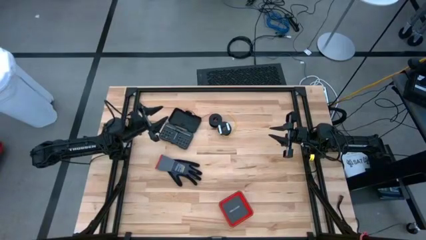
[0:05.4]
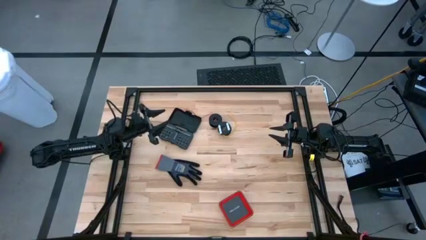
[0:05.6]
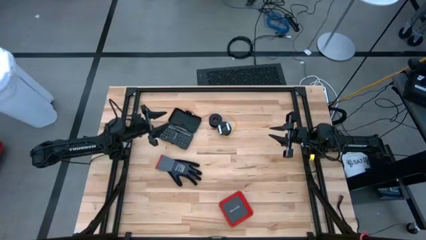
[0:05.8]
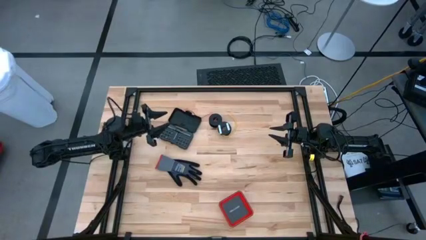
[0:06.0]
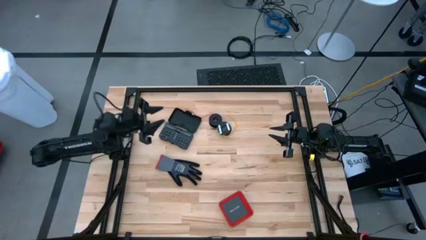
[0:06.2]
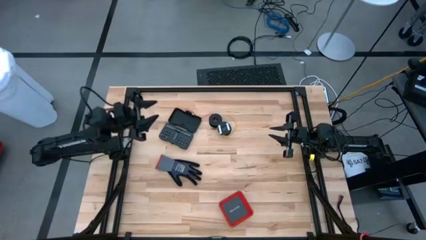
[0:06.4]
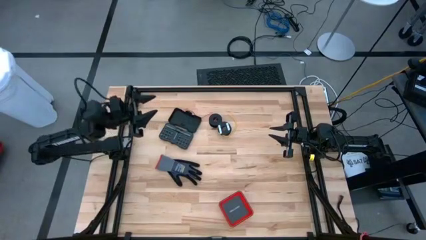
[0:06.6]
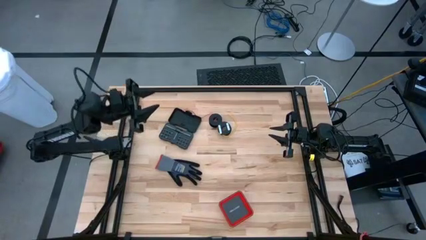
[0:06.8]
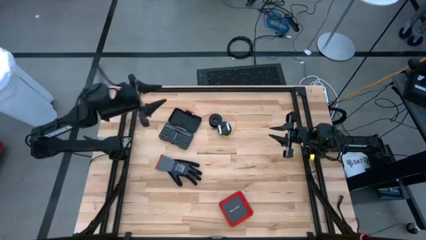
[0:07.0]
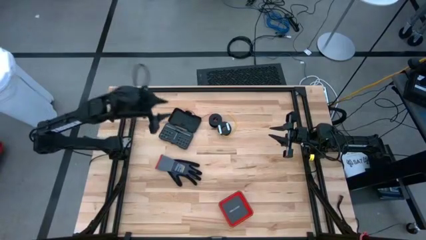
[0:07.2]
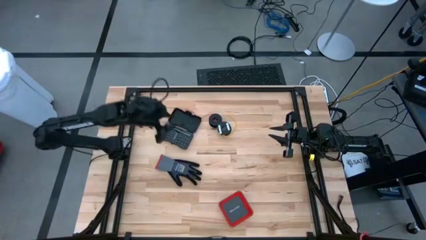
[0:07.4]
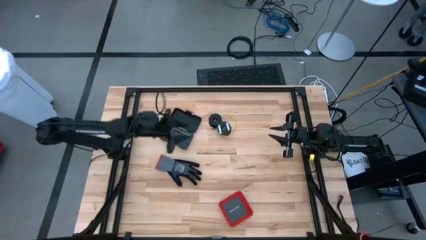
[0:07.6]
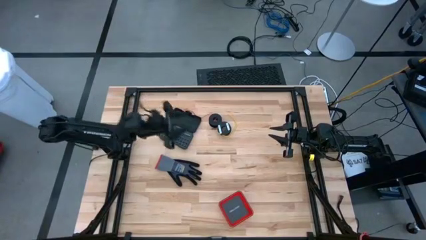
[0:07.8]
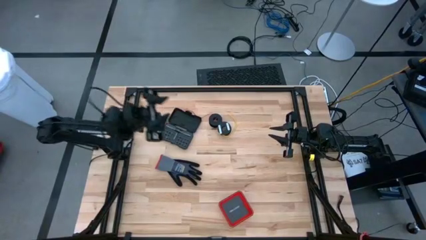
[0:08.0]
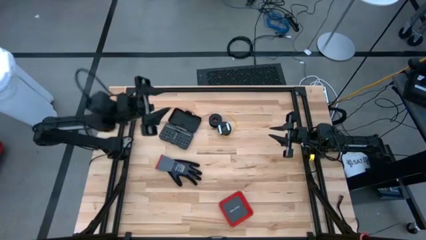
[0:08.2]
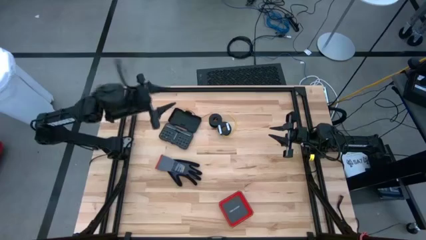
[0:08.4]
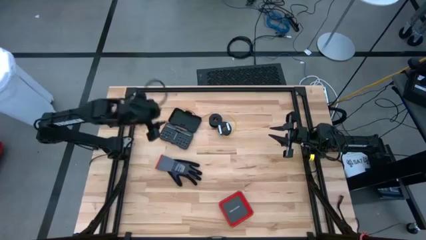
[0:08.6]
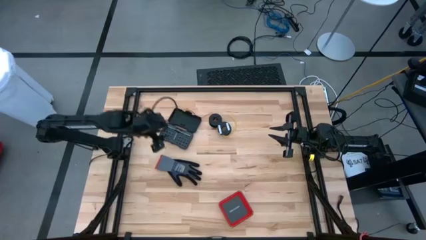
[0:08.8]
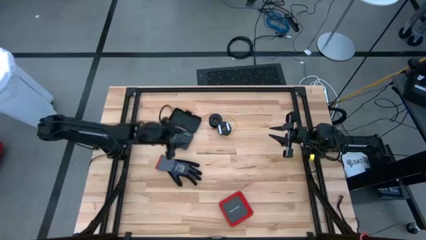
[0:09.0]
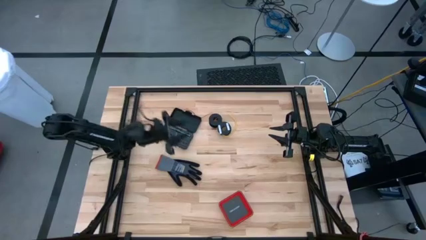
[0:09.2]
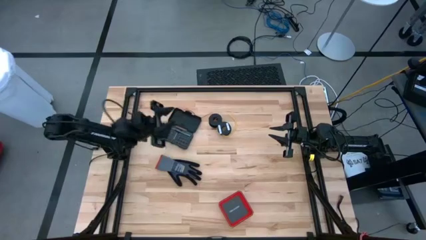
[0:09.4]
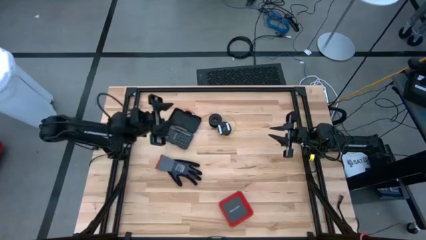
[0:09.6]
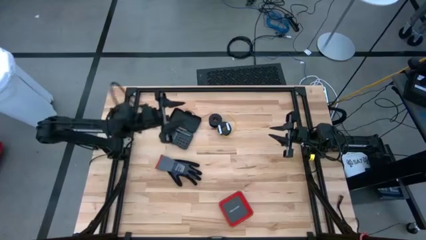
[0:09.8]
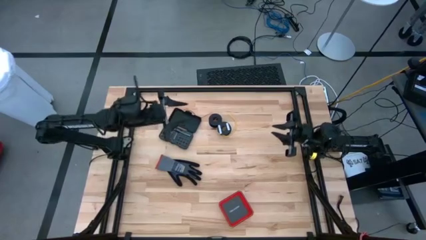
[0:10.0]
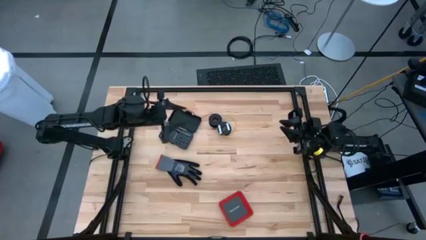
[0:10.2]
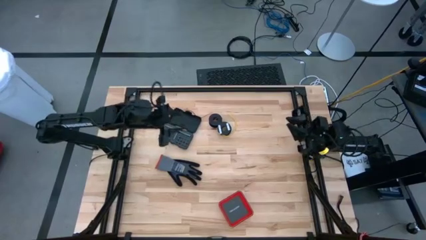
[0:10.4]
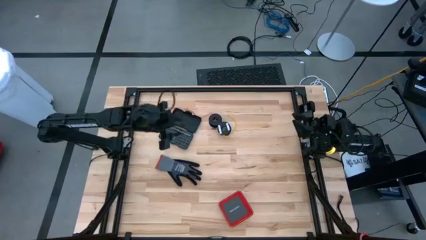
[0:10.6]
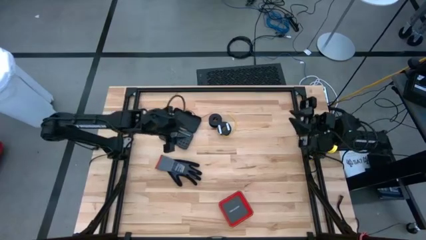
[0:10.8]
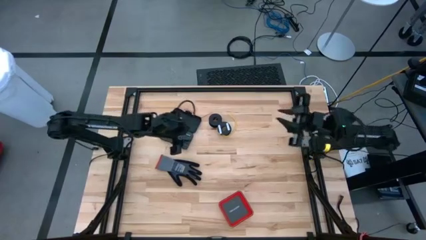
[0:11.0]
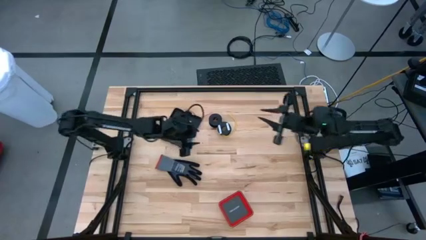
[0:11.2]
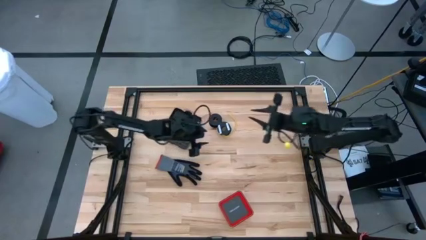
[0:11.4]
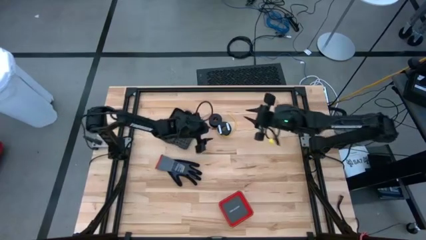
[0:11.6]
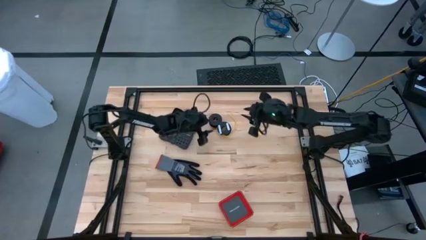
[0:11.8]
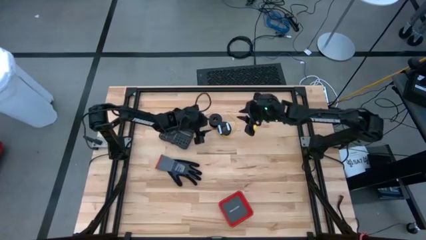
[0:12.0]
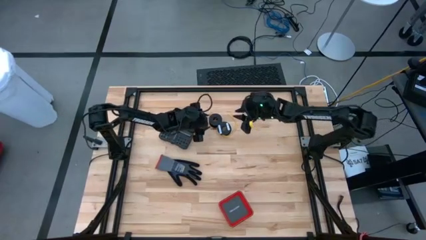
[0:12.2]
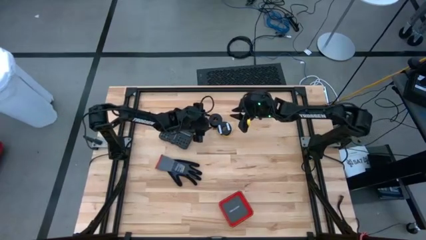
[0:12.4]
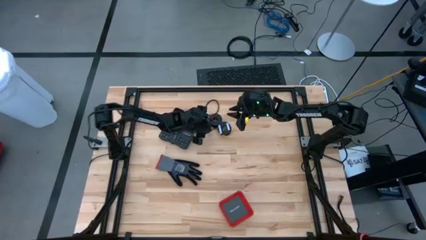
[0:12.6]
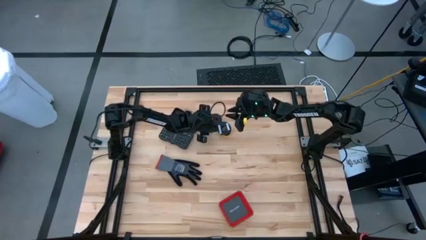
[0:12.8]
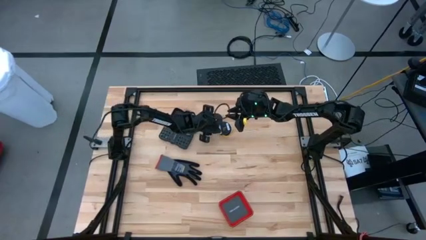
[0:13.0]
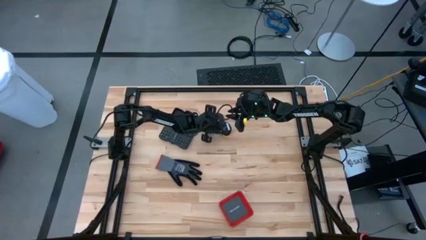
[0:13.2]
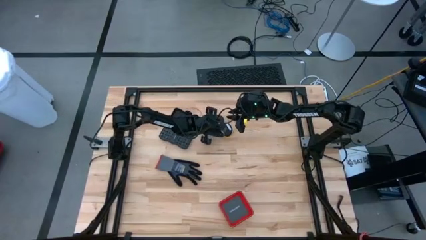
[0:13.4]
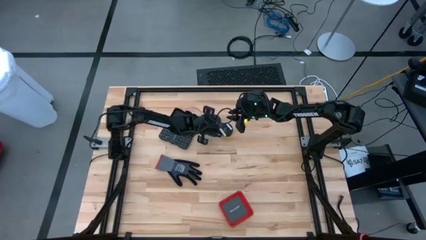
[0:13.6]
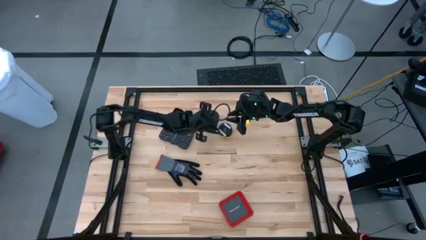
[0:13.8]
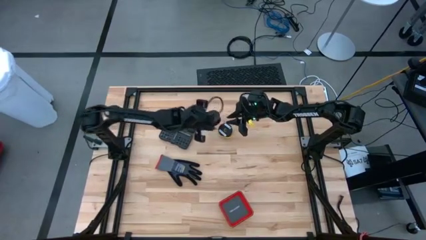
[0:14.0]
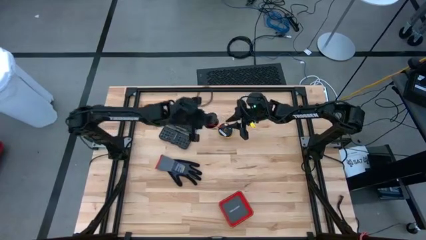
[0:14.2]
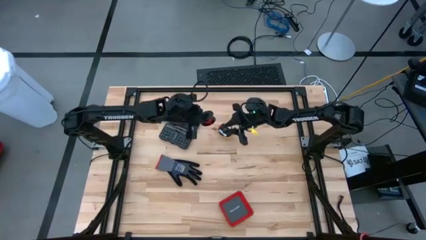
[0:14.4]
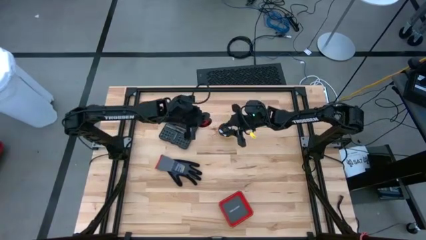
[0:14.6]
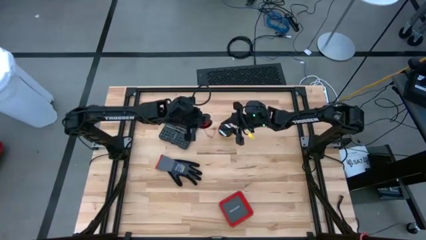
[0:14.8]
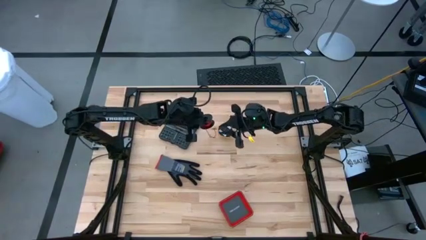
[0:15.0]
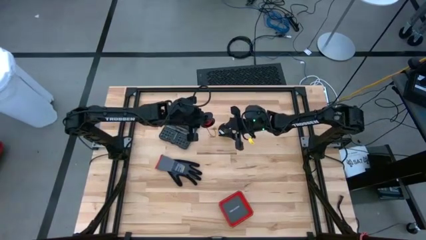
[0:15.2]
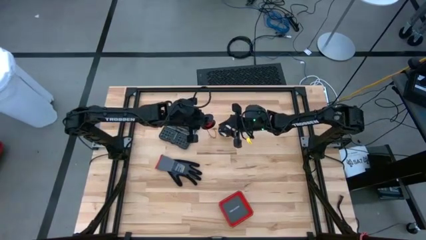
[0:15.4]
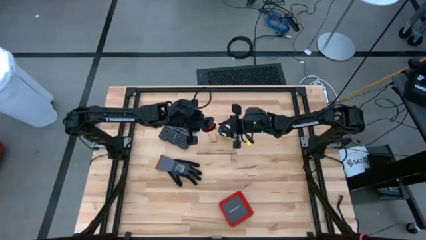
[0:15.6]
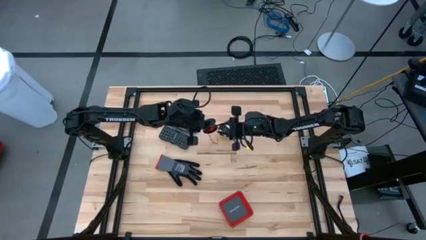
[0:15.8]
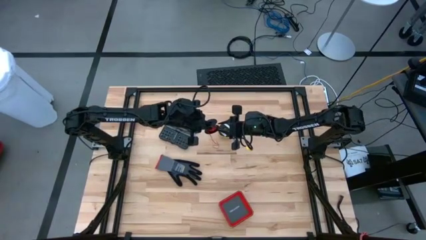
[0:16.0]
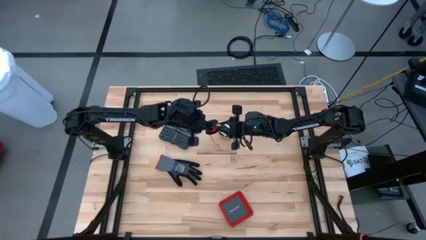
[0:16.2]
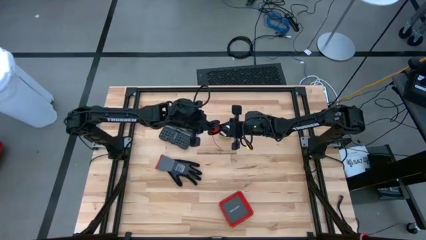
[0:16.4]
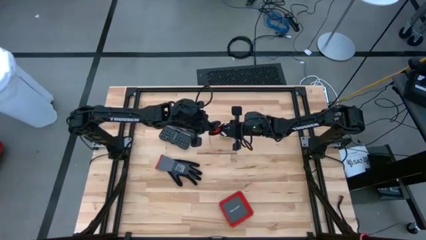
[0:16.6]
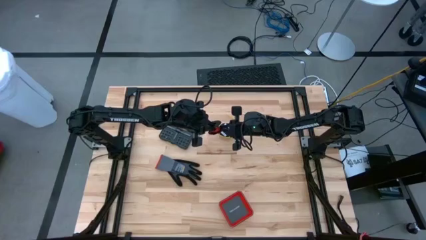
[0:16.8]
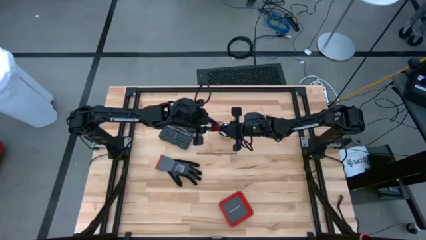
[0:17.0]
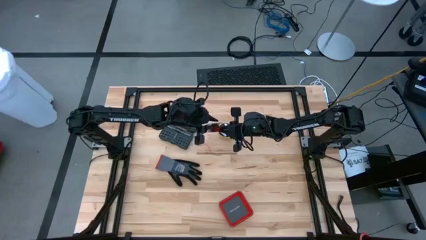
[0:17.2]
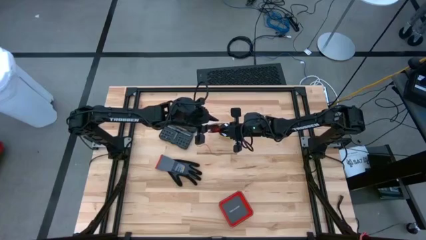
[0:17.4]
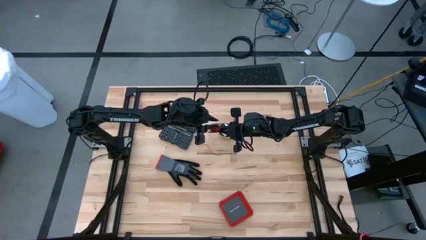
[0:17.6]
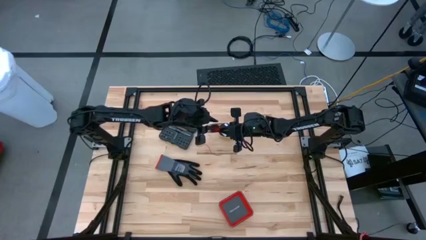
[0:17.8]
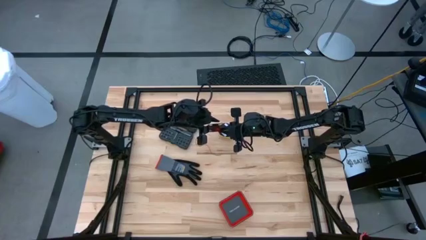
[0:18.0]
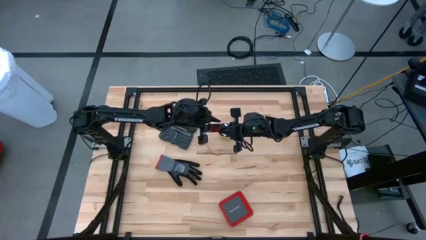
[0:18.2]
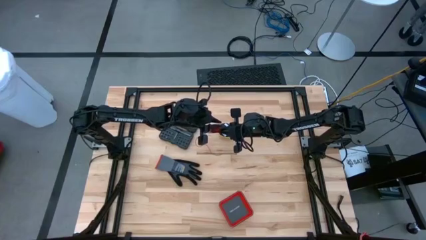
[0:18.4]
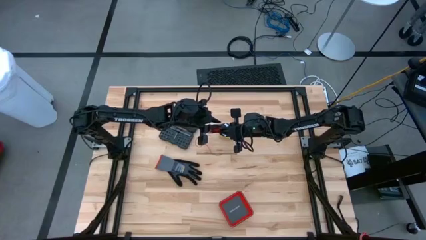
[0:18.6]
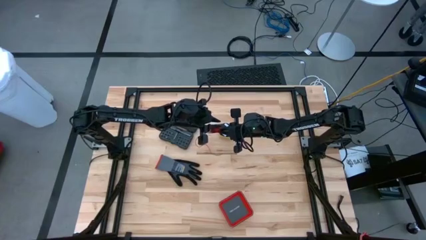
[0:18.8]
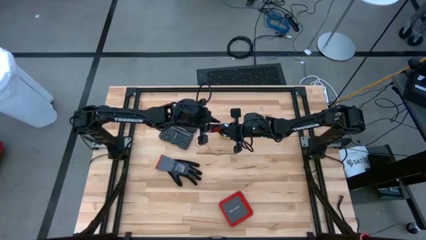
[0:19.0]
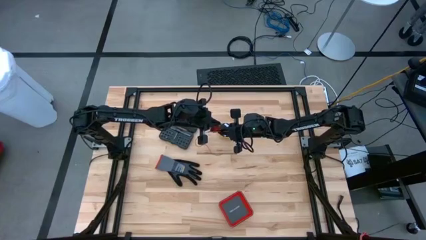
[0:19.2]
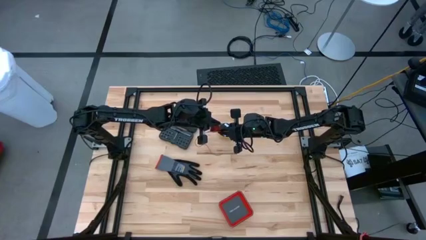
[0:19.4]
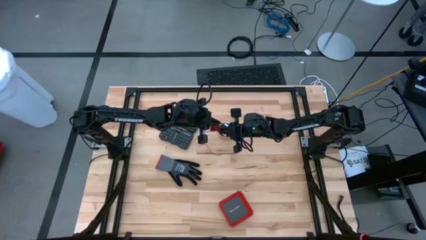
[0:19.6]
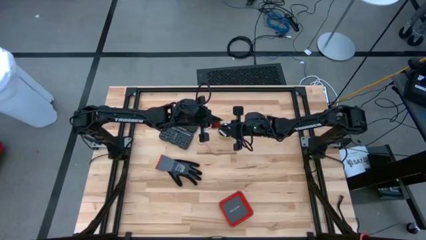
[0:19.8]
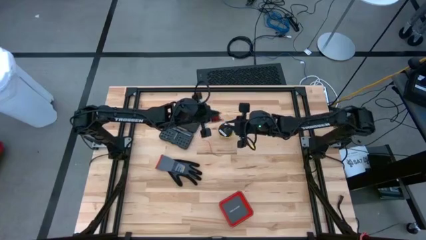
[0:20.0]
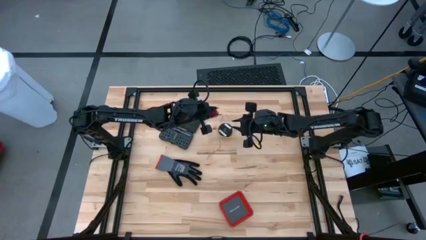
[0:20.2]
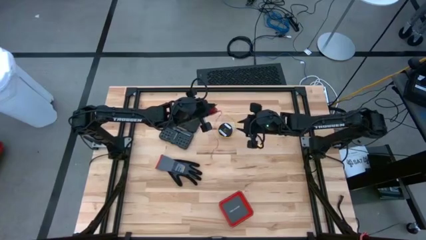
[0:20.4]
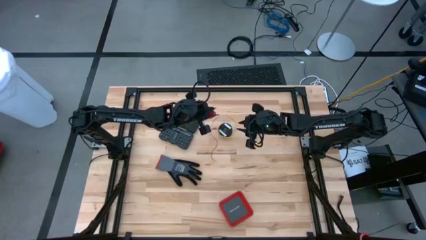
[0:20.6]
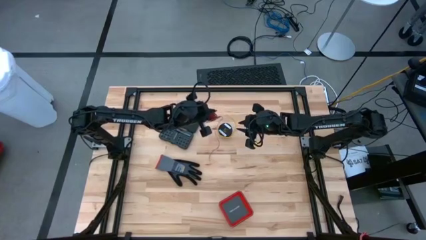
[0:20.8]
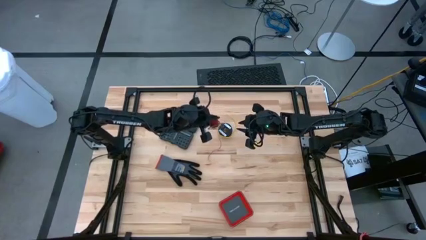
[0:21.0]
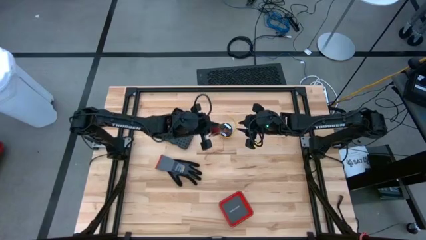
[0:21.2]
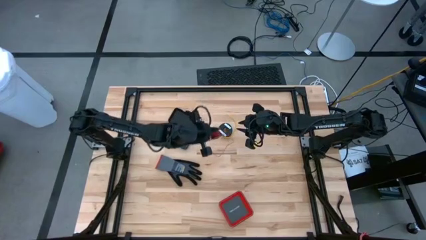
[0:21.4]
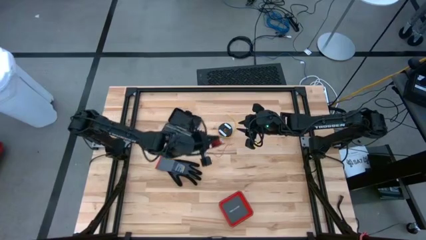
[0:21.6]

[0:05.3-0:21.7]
Task: Coil cords
Uncoil the red wire from the spool
